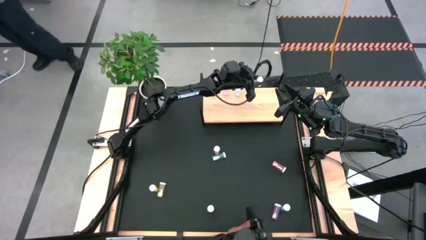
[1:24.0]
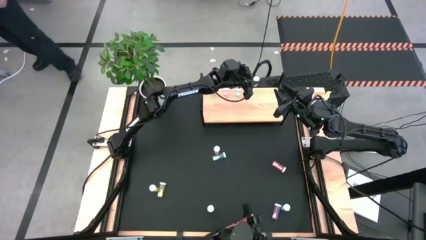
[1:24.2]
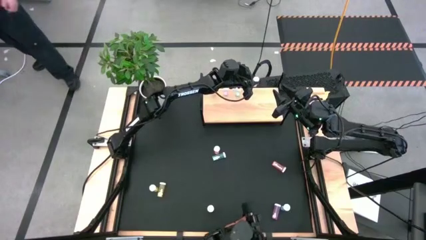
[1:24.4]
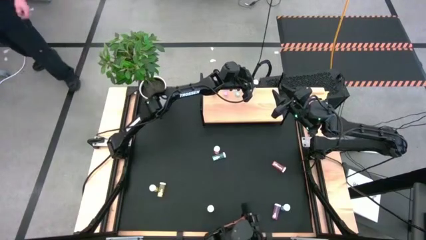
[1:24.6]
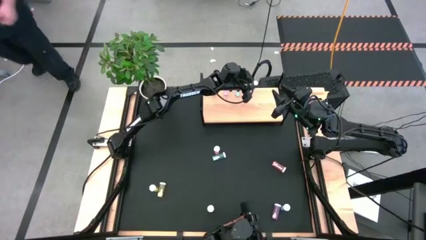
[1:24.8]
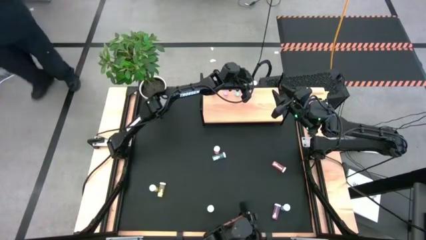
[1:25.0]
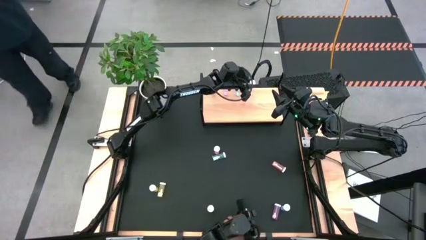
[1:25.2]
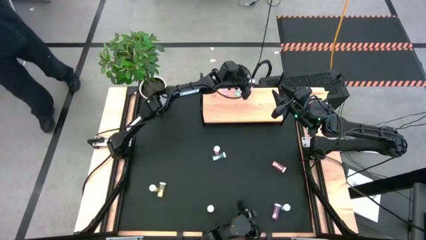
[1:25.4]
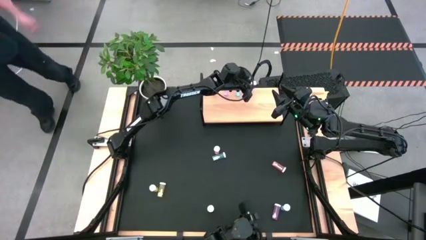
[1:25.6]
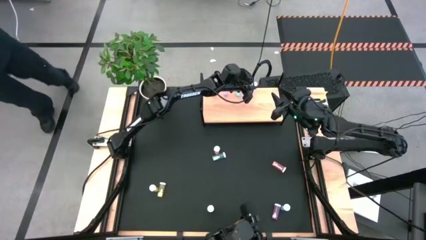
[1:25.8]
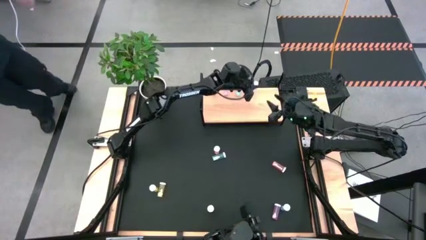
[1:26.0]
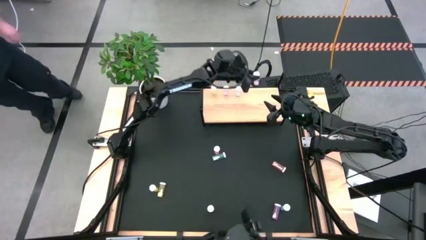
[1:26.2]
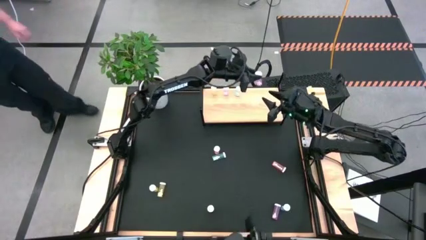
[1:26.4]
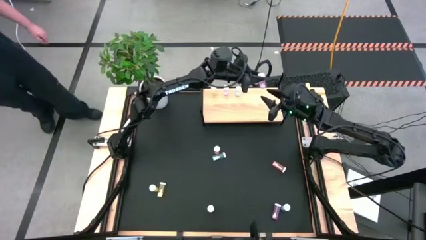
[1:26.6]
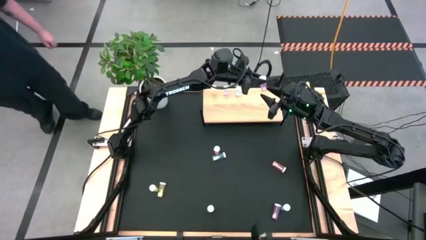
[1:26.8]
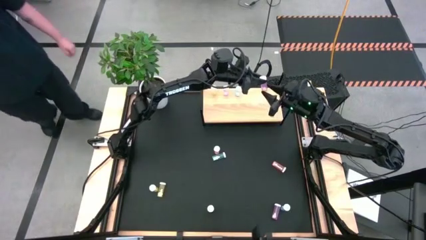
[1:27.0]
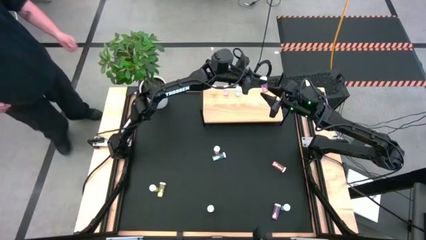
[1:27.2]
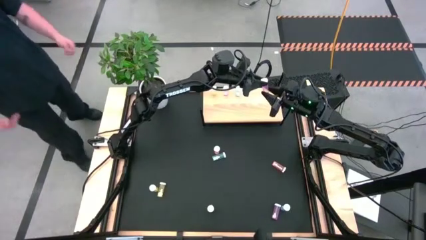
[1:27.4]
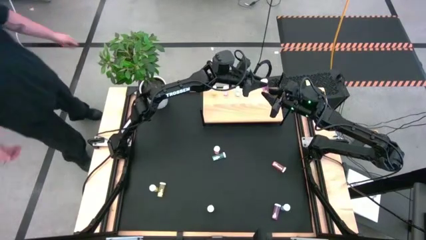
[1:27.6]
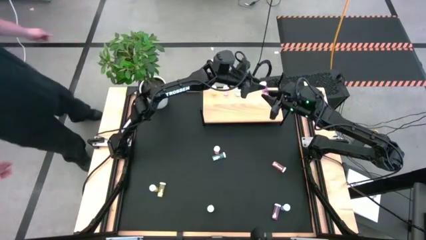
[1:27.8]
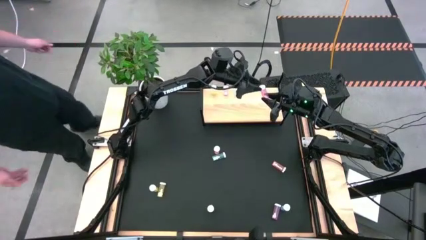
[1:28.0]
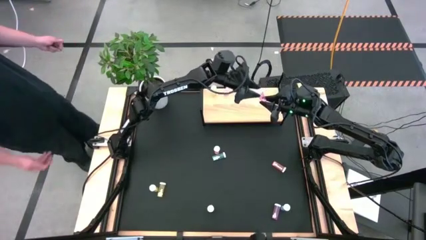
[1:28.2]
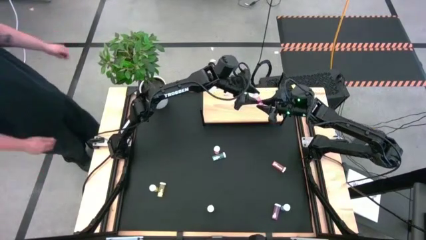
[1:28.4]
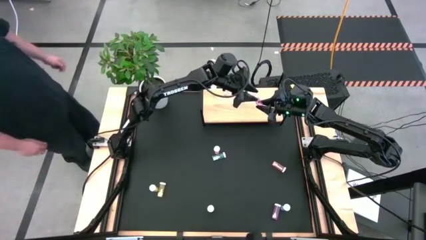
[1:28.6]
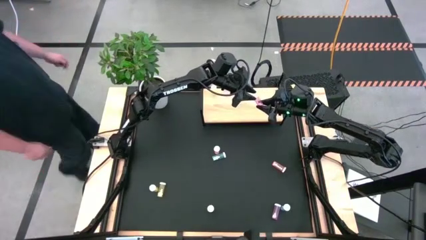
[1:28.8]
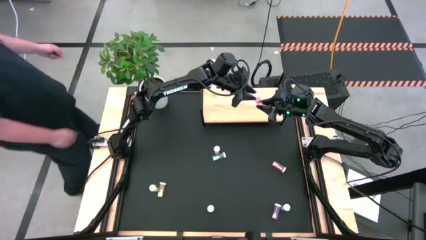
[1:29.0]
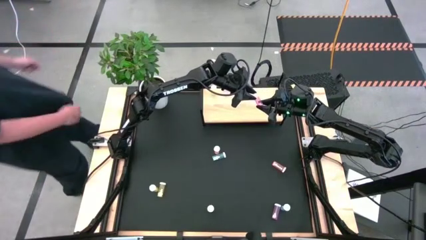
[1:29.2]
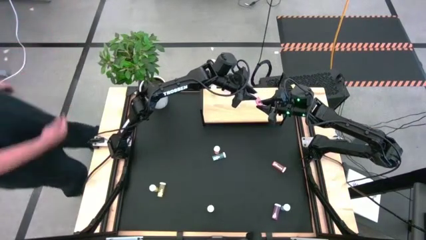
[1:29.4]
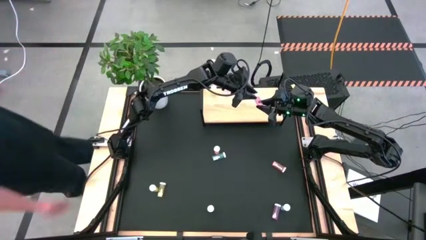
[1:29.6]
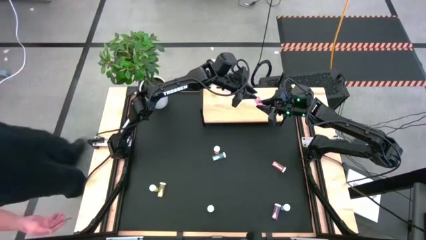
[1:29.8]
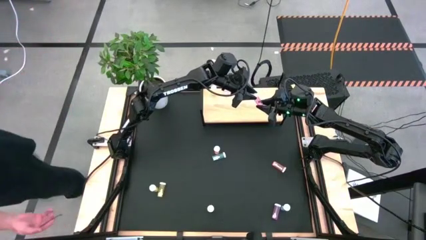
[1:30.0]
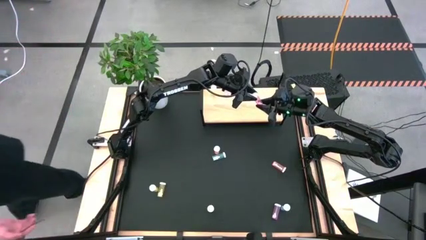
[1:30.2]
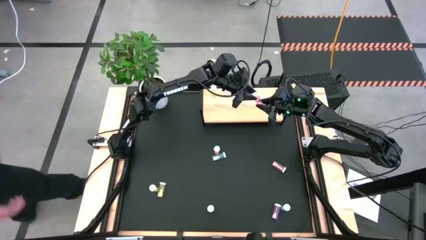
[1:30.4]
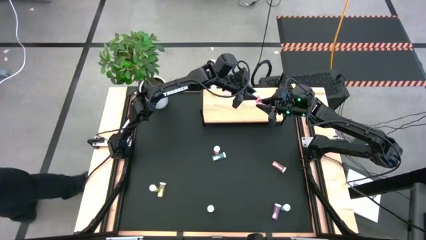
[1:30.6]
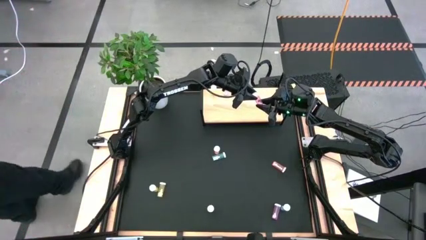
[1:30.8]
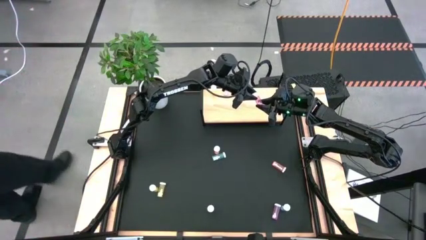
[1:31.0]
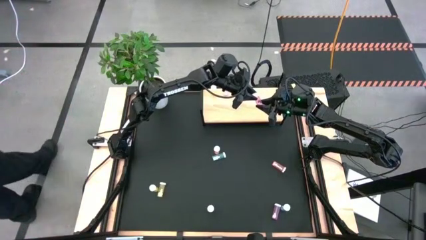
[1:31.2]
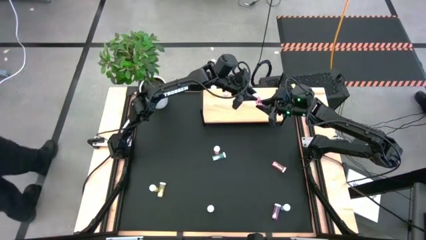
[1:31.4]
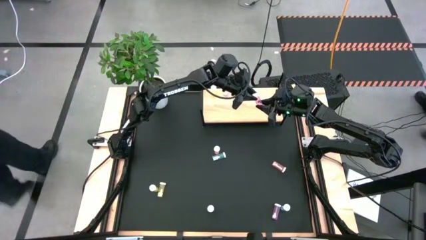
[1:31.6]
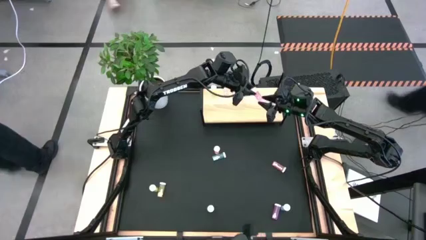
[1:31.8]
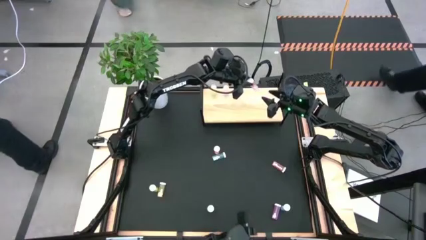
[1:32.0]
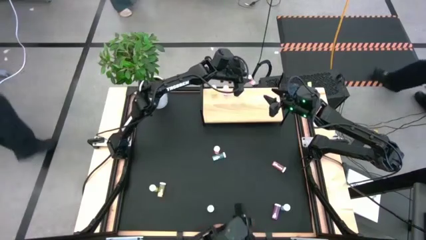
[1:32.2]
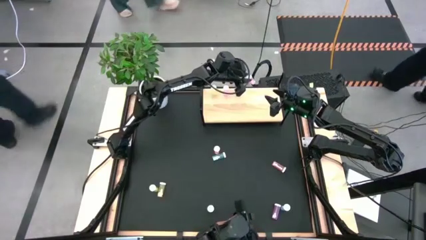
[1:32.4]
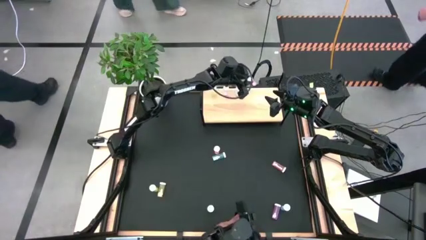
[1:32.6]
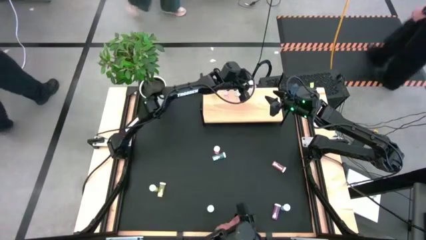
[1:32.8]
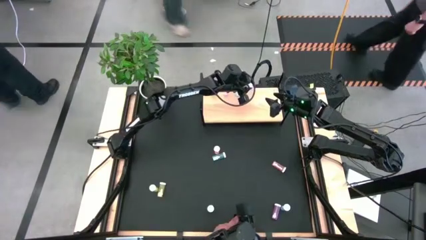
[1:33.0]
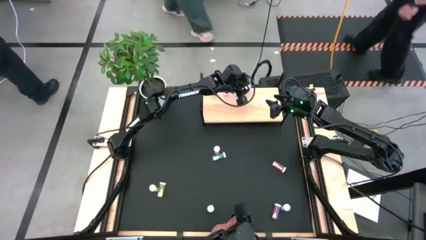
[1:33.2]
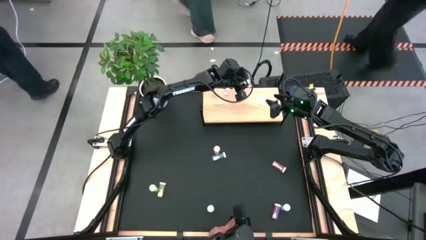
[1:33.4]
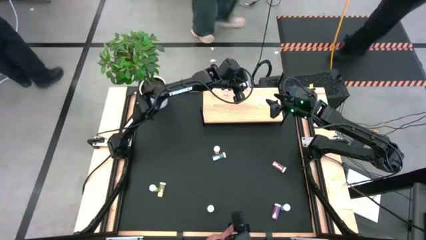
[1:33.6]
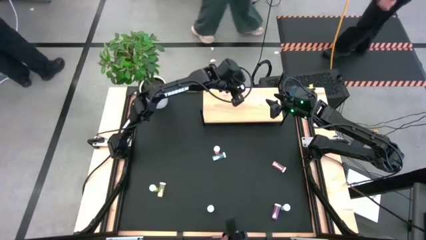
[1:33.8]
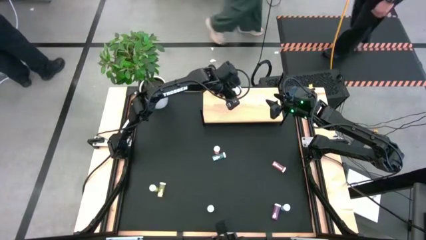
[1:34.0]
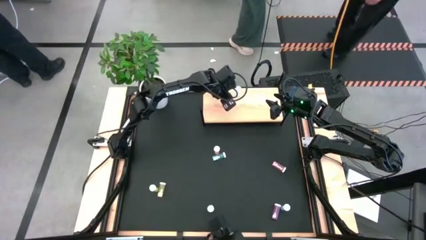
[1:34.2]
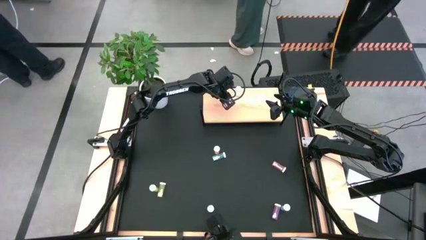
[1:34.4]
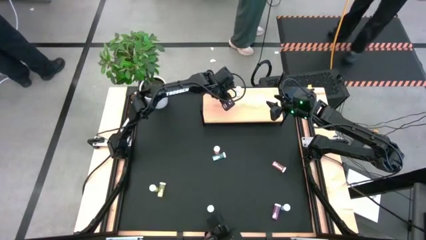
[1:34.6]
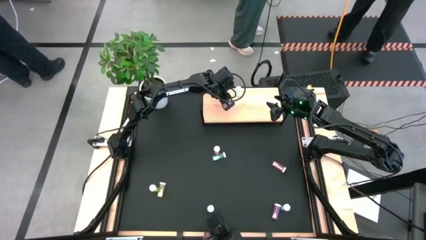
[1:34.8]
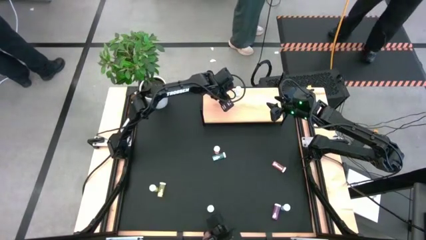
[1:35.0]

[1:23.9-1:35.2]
Task: Pick and place medicine bottles onto shelf by color
Put the top pink pill bottle on the shelf aligned with the other pink pill bottle

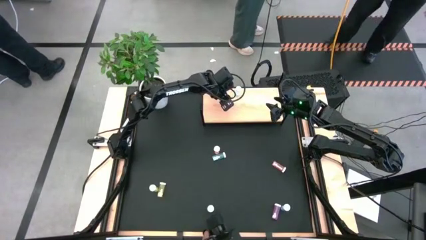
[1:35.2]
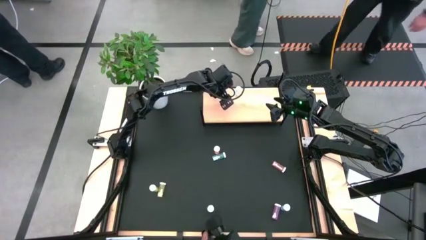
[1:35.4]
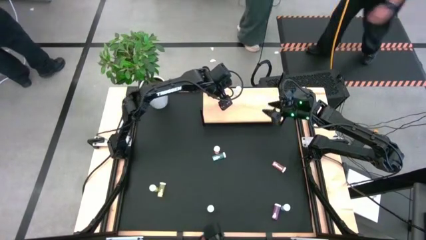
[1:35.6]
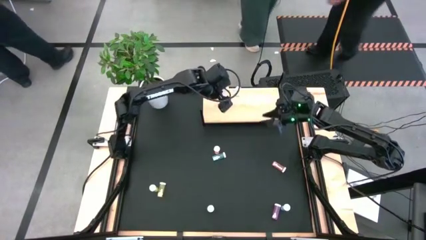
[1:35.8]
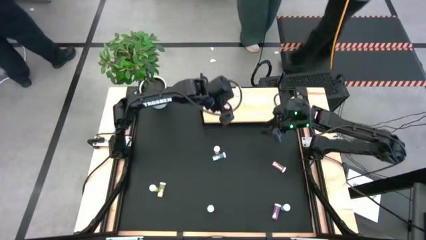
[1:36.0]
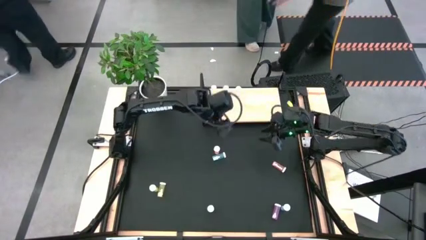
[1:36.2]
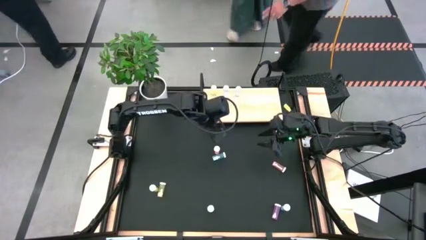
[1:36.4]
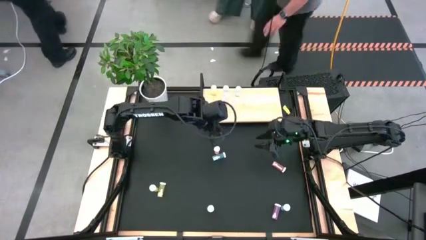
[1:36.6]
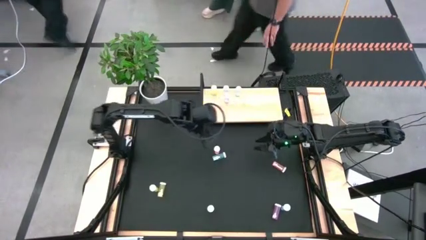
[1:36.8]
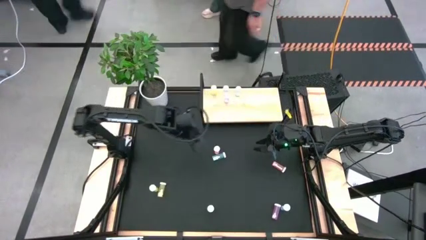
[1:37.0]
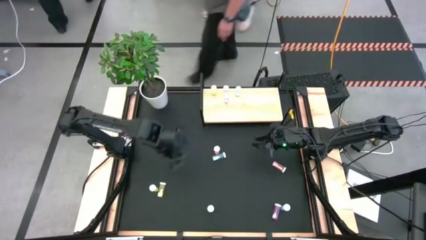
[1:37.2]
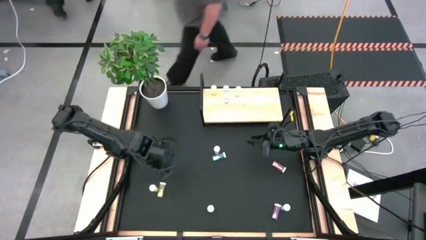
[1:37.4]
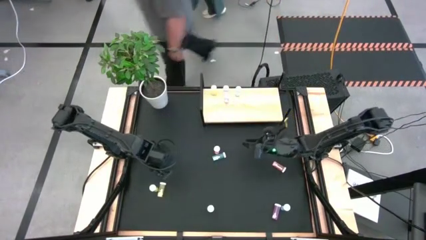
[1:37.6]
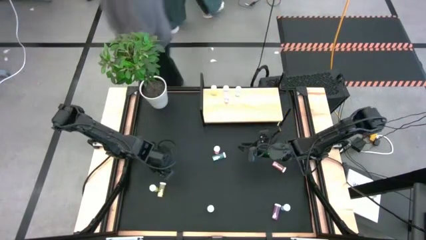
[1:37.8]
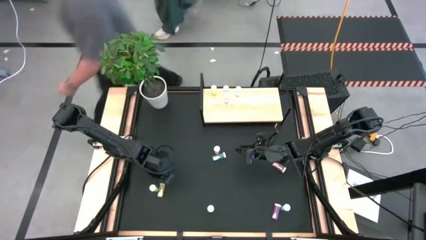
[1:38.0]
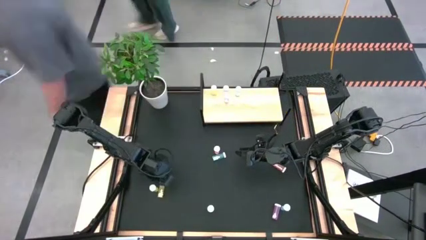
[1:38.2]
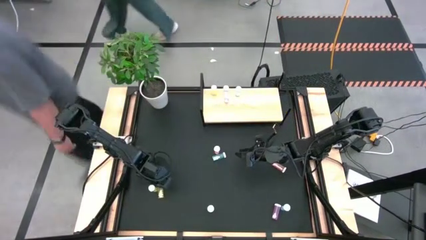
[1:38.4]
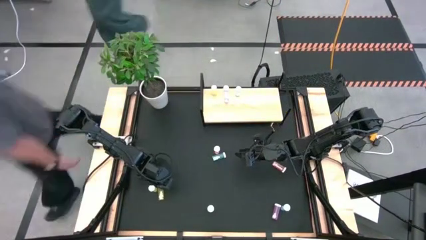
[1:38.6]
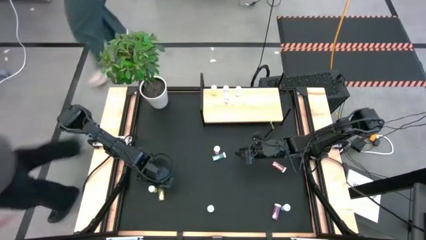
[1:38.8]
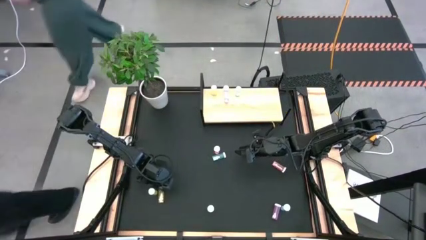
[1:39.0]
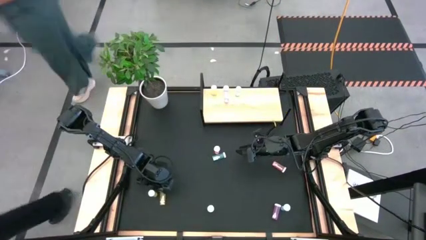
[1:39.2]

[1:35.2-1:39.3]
Put the right yellow pill bottle on the shelf aligned with the other yellow pill bottle

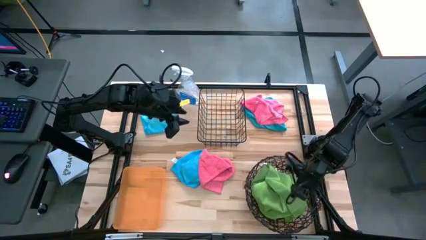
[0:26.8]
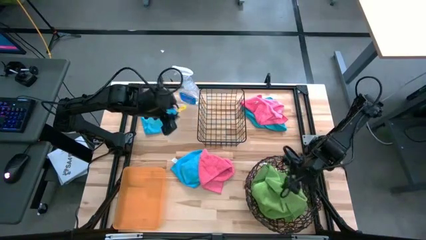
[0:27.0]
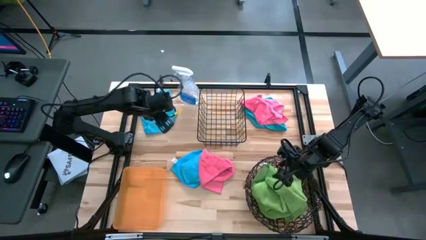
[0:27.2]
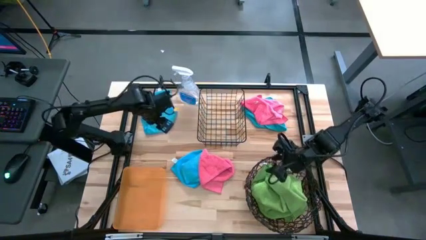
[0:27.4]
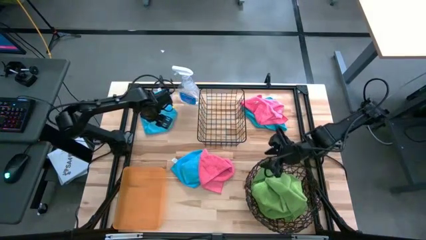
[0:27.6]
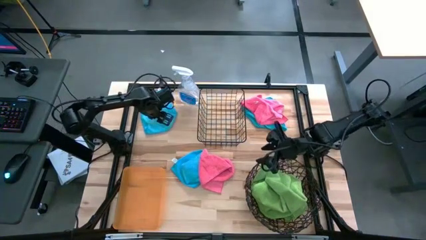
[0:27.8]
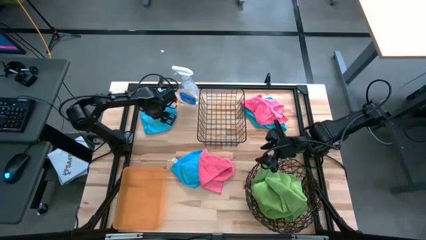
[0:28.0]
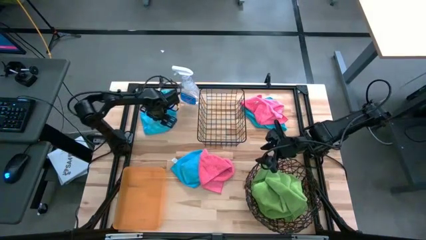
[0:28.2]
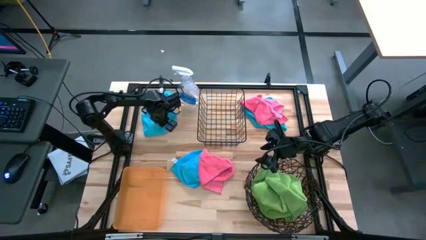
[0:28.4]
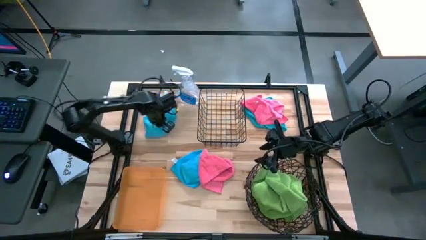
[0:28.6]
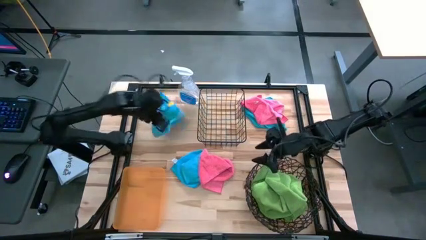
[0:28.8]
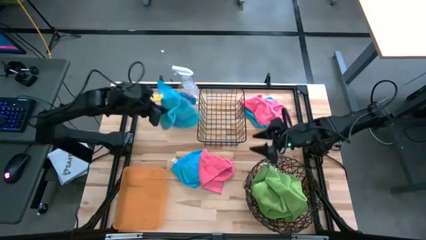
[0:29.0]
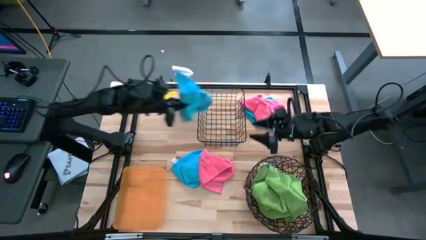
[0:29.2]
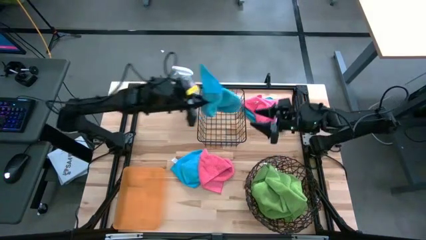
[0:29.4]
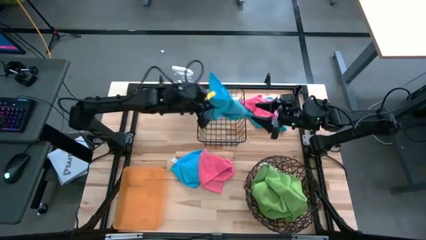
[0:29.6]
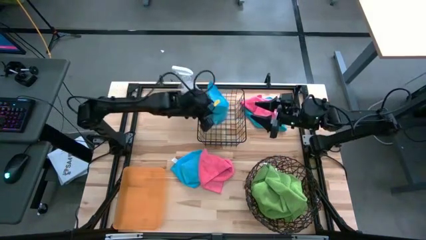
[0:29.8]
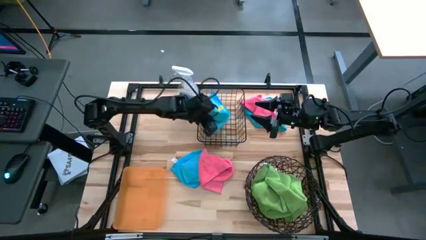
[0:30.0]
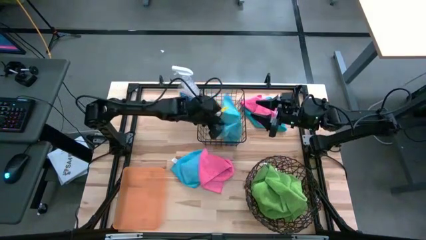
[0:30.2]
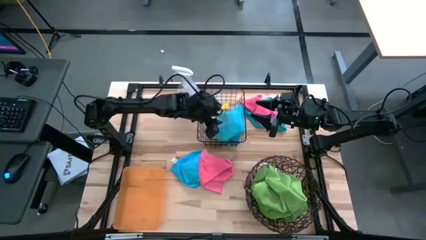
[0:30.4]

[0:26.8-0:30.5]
Task: Sort microfiber towel by color & place in baskets
Put the top left blue towel into the wire basket
